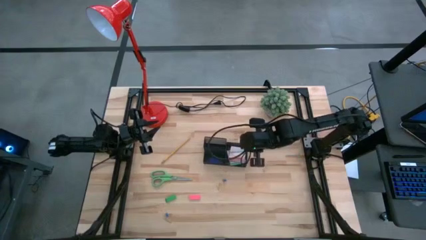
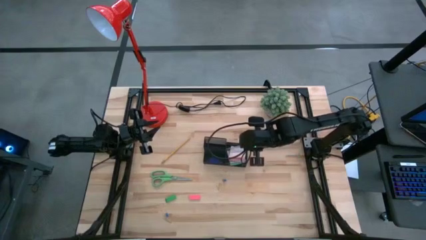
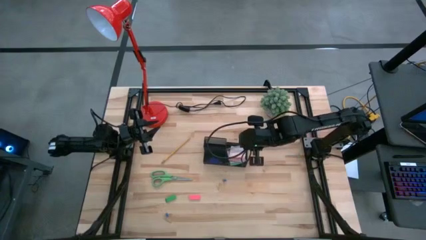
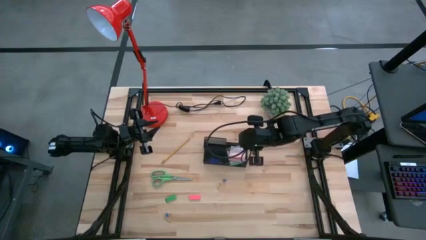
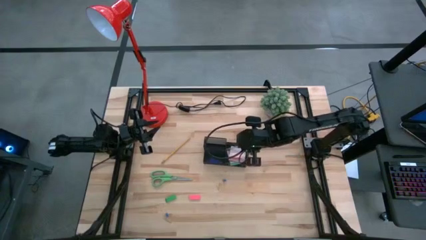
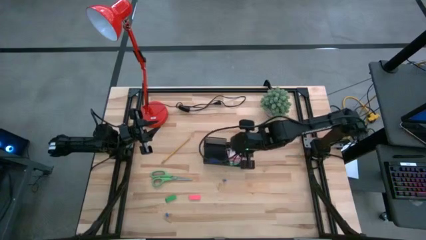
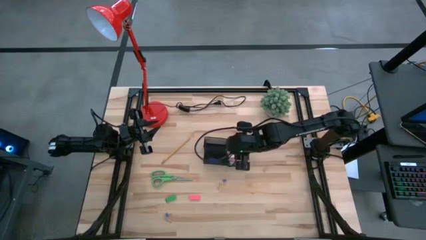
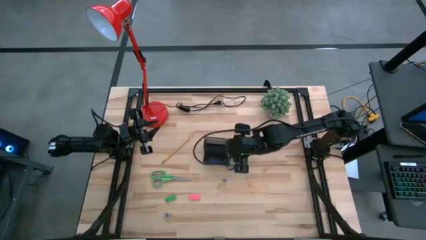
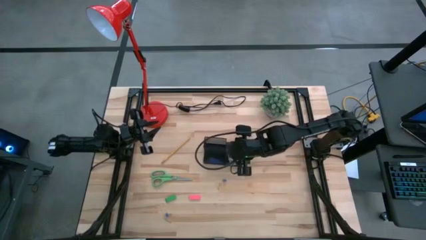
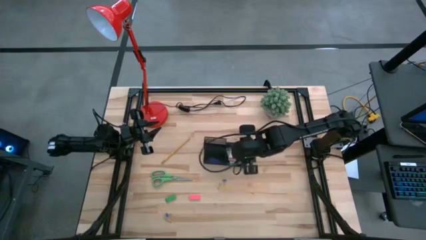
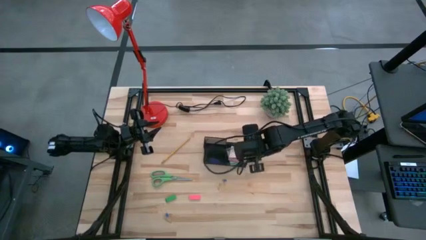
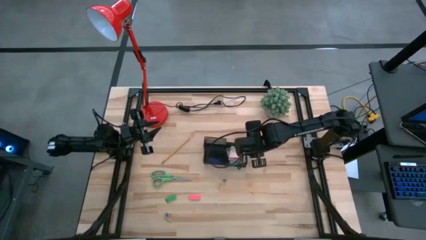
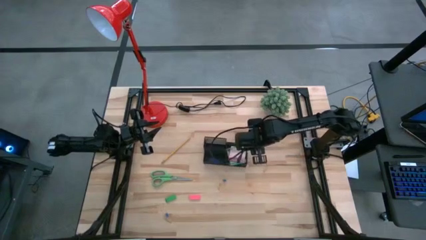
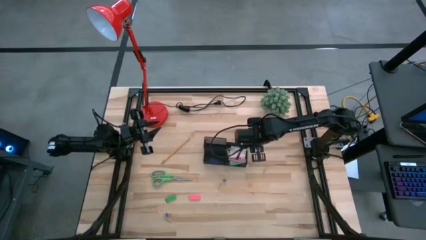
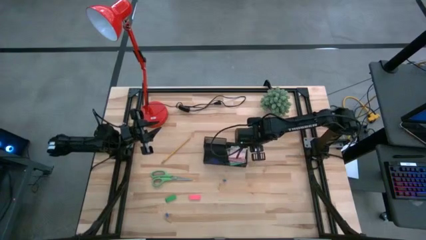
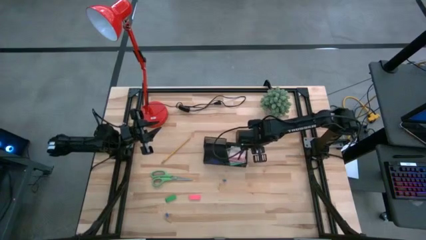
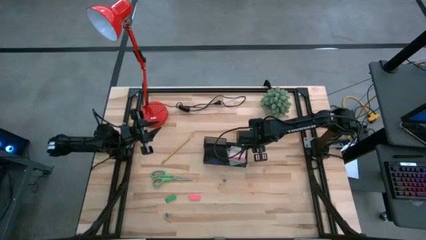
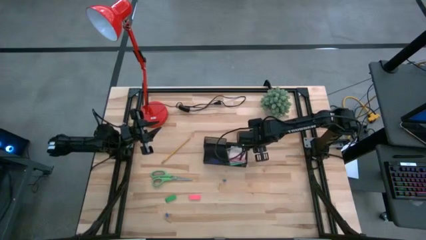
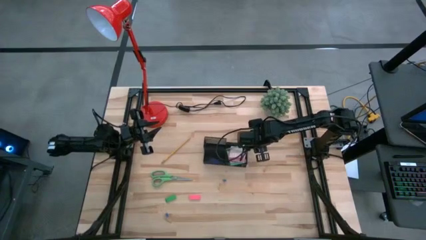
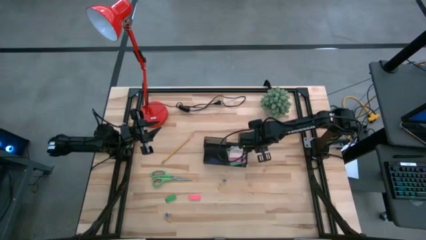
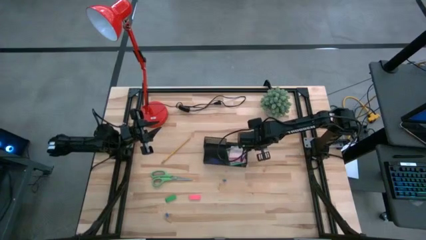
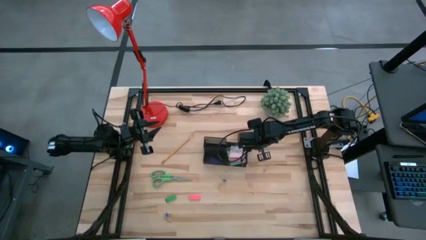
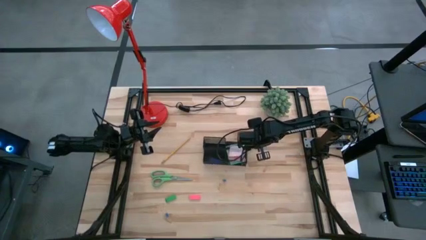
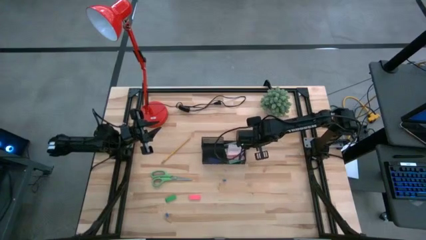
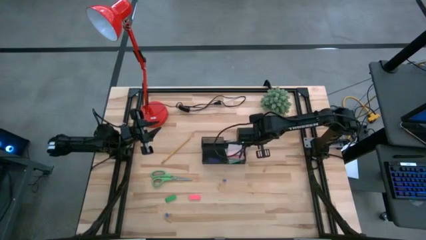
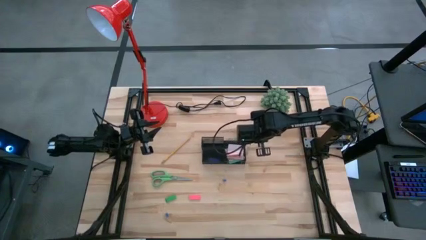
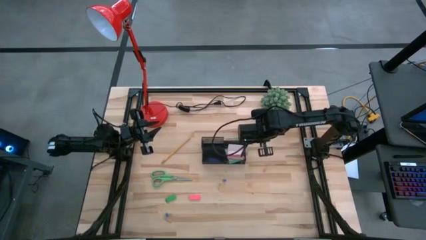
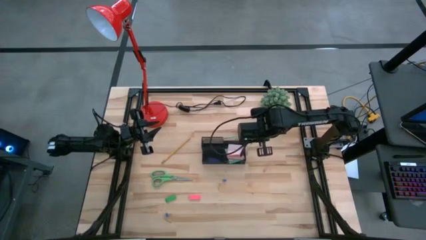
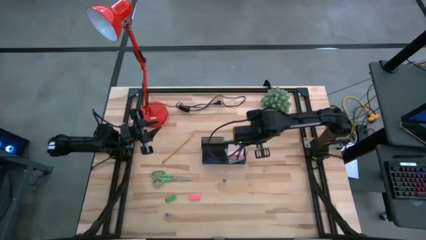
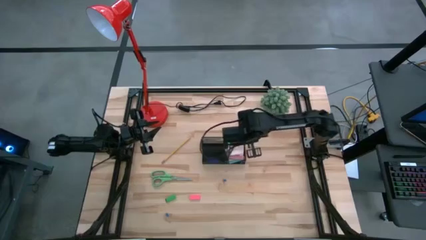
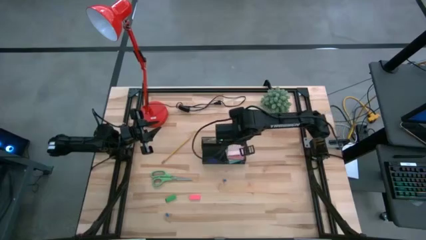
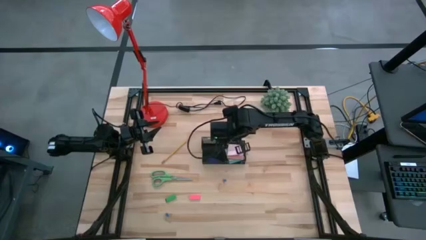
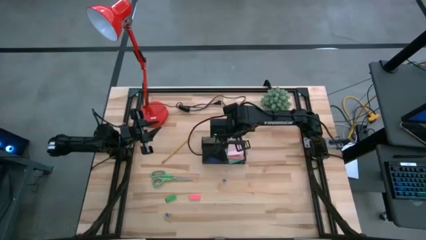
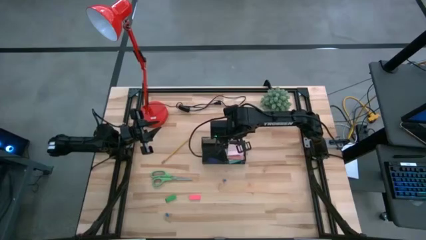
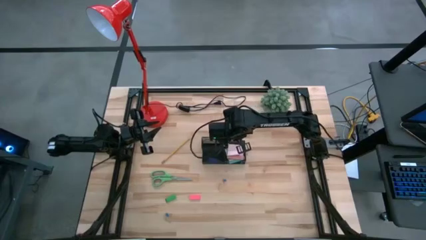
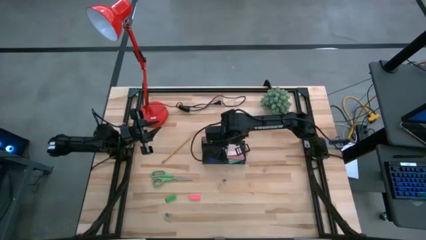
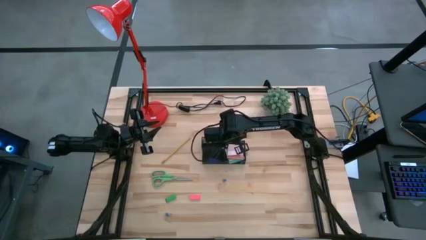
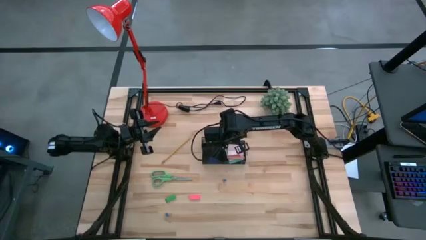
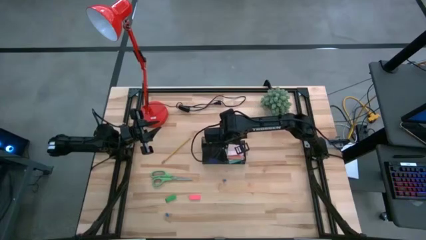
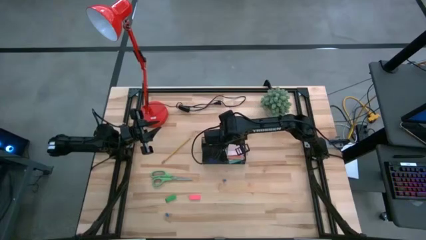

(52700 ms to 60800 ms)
Task: Pick and place office supplies into organizer
Put the light blue pencil into the black desk organizer

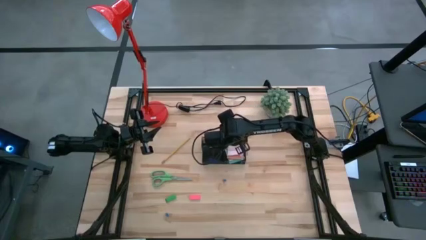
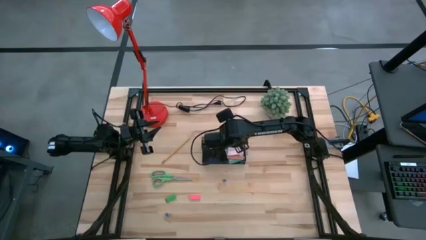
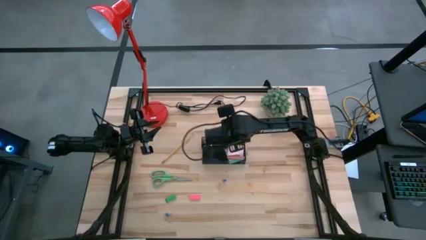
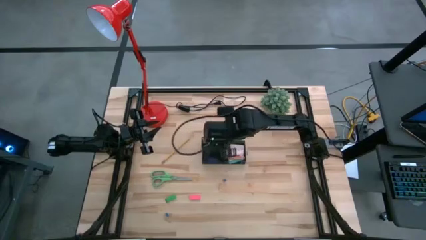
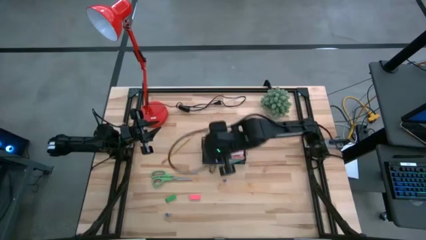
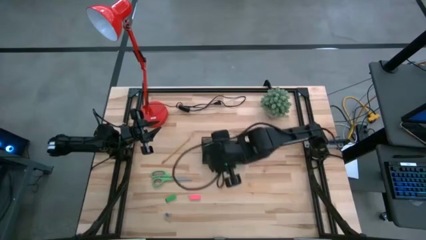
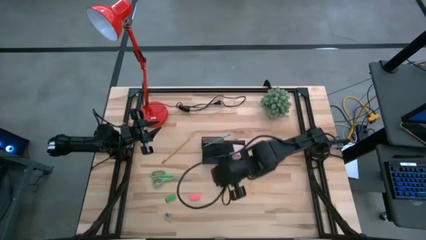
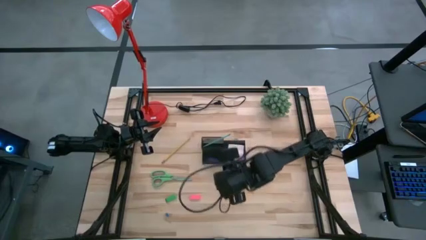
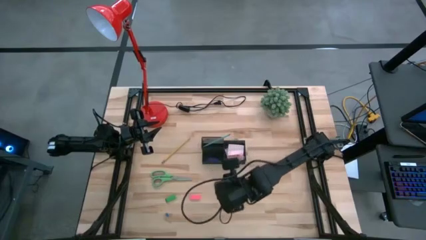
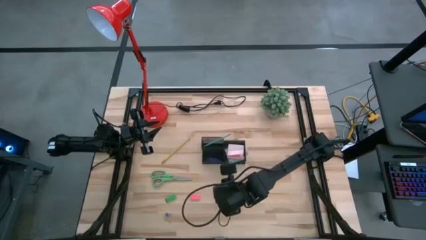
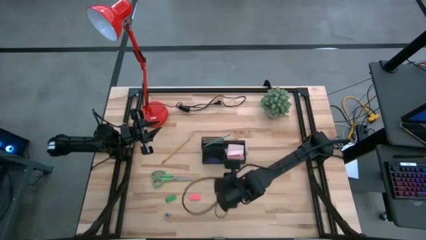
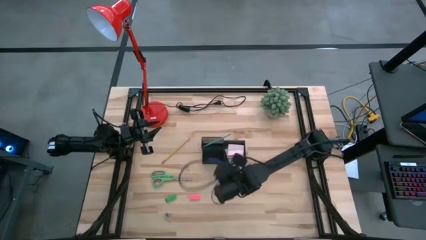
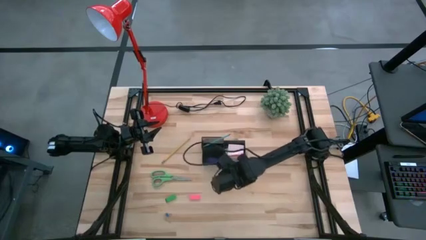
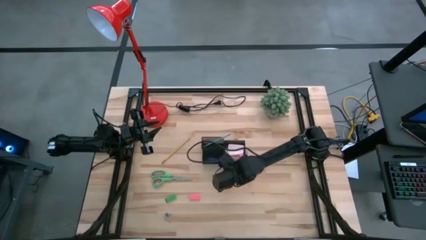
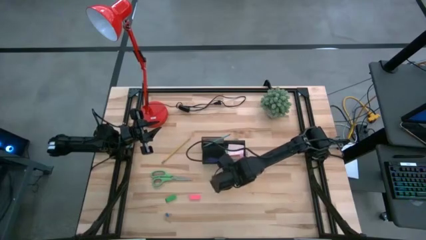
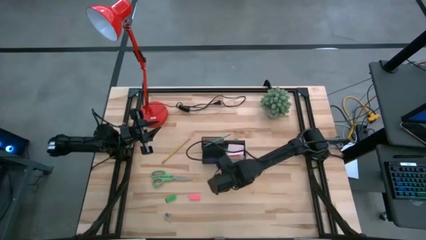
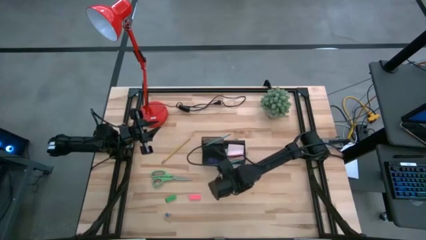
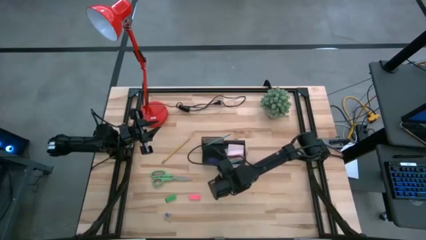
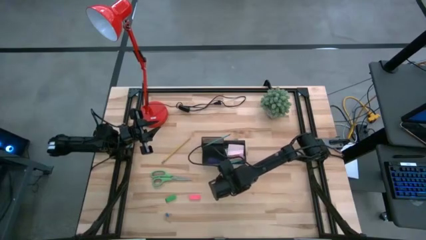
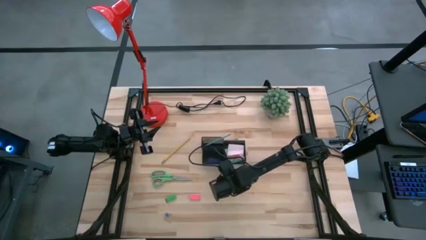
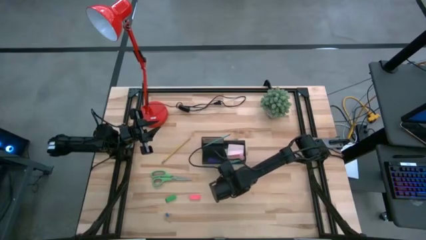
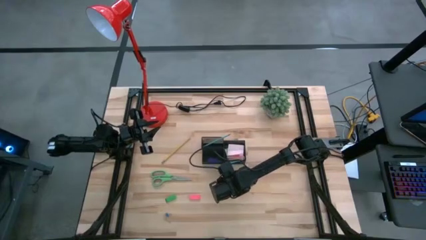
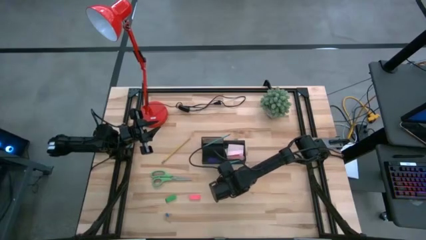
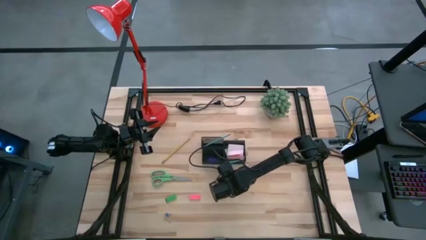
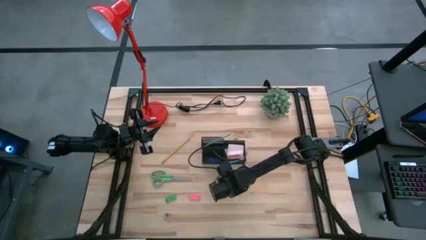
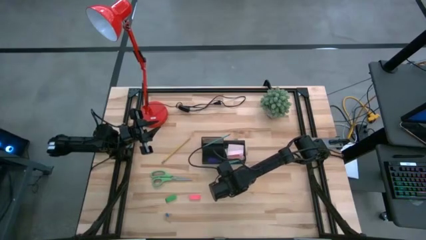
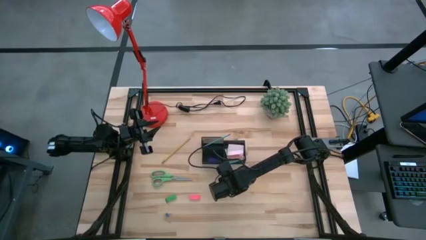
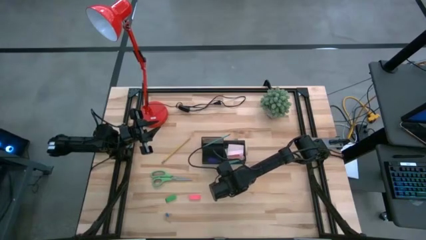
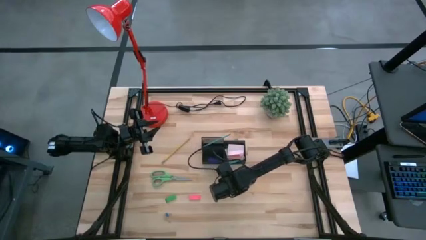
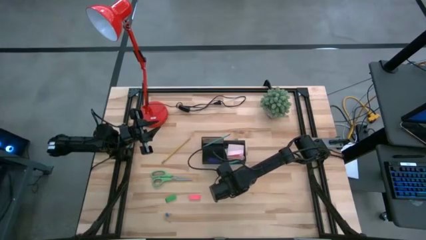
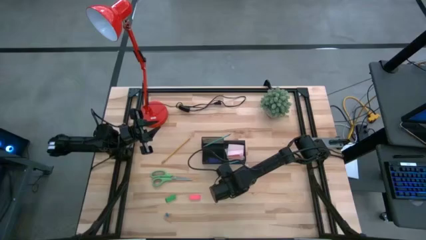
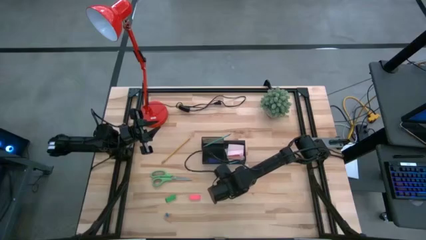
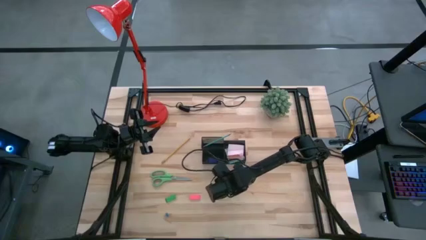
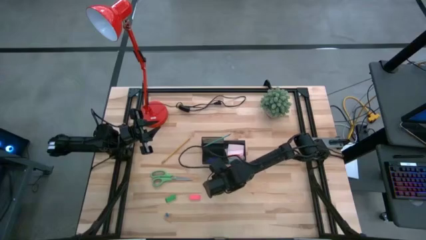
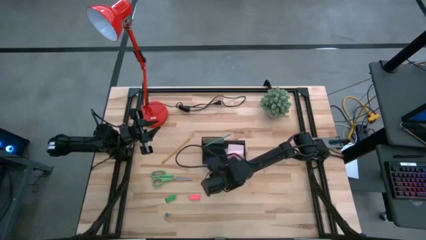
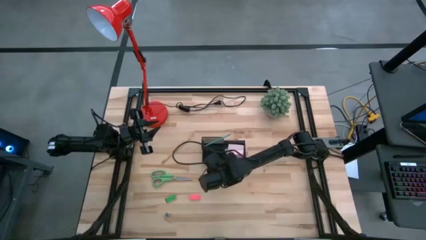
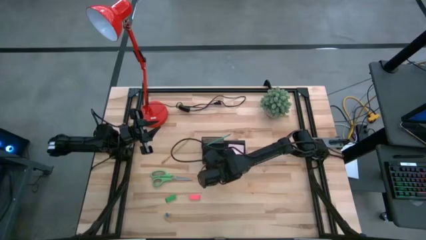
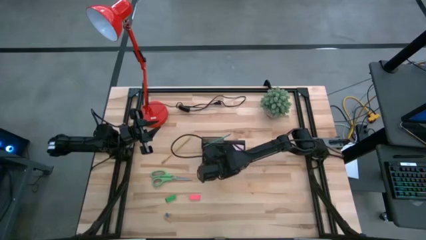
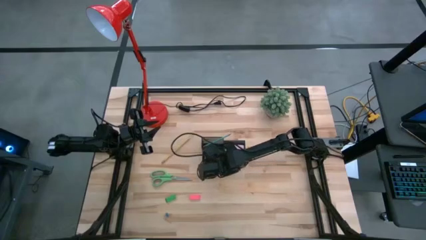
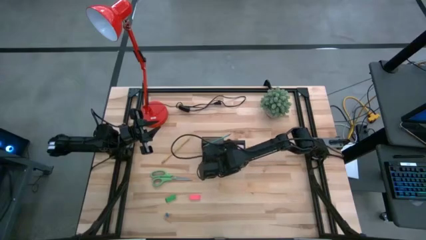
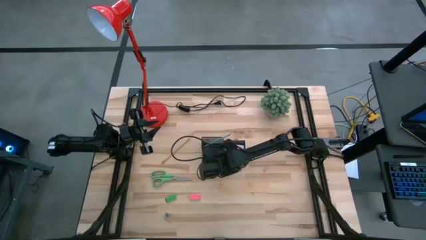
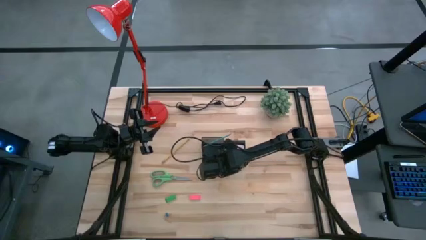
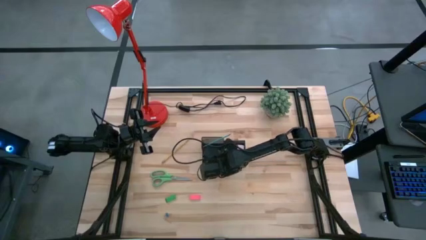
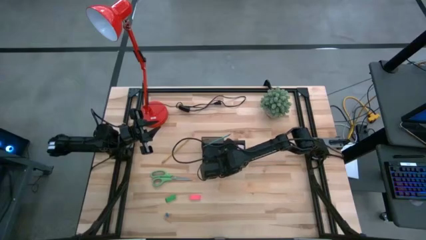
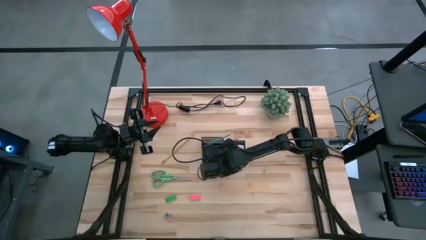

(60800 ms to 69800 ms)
Put the top blue binder clip into the black desk organizer
